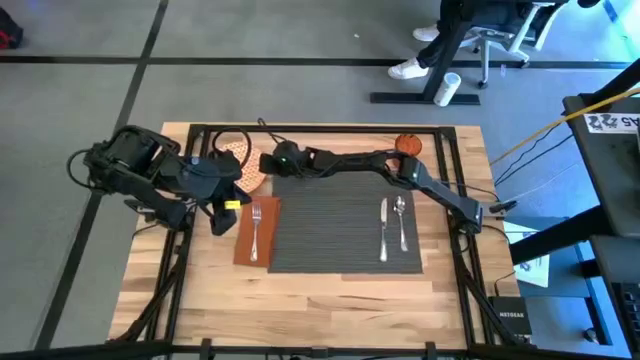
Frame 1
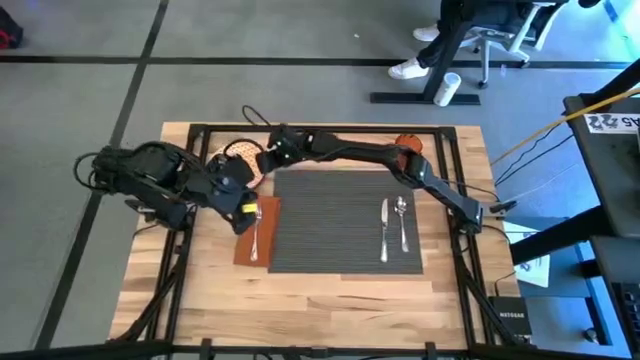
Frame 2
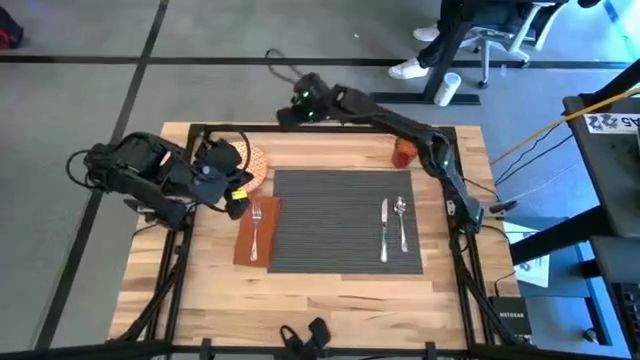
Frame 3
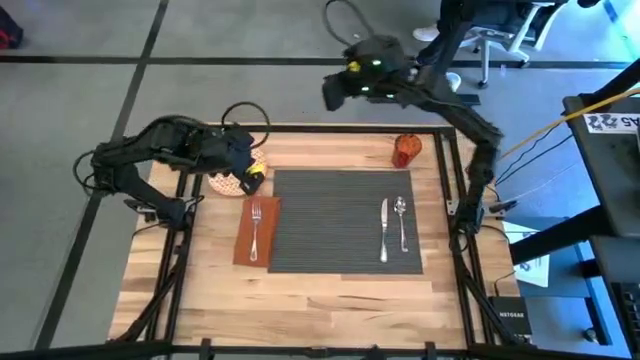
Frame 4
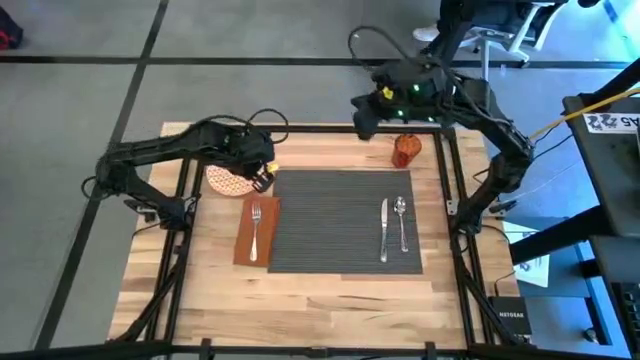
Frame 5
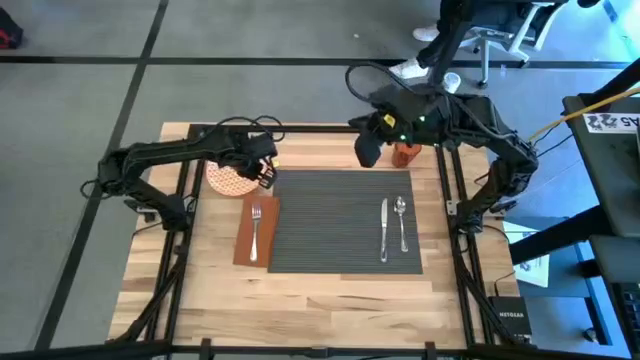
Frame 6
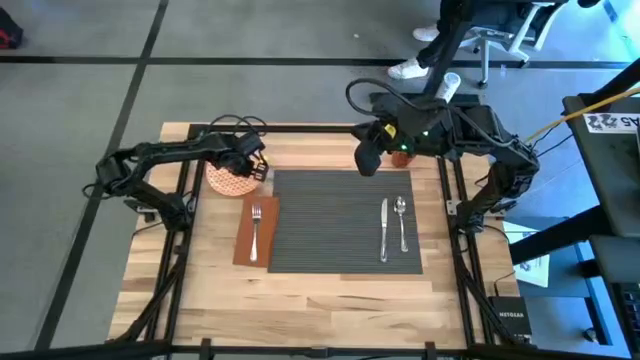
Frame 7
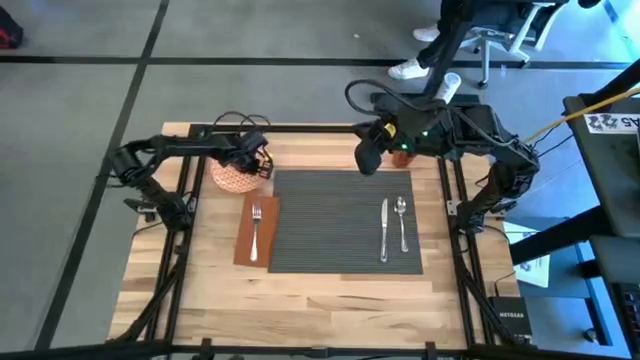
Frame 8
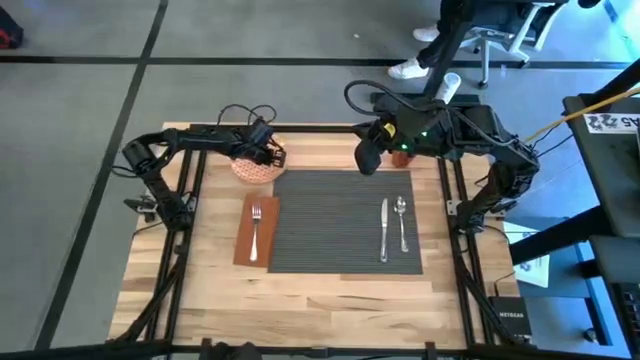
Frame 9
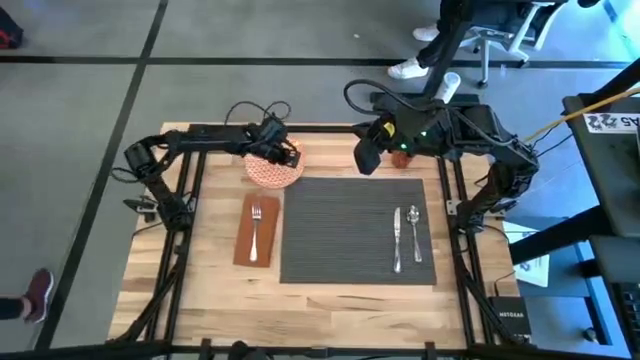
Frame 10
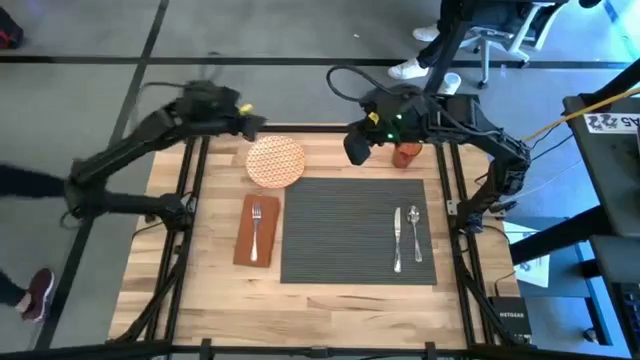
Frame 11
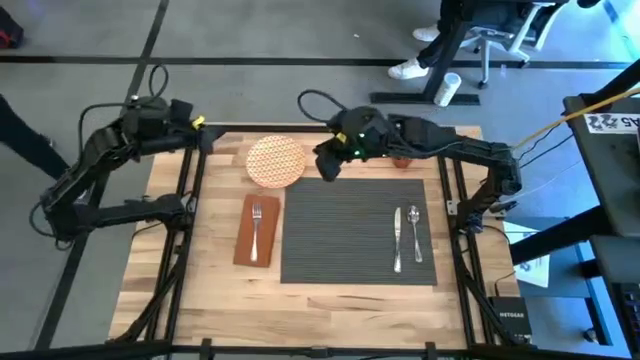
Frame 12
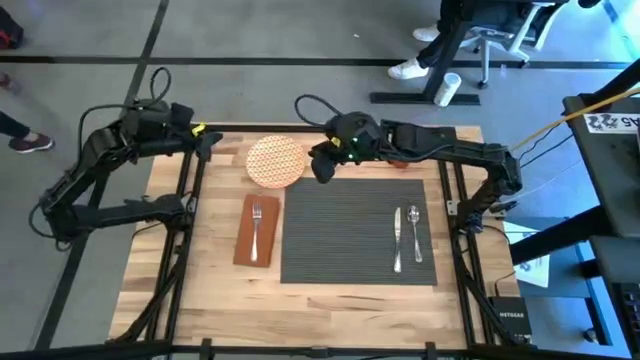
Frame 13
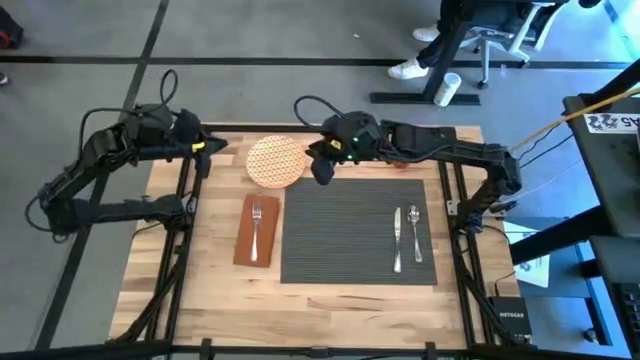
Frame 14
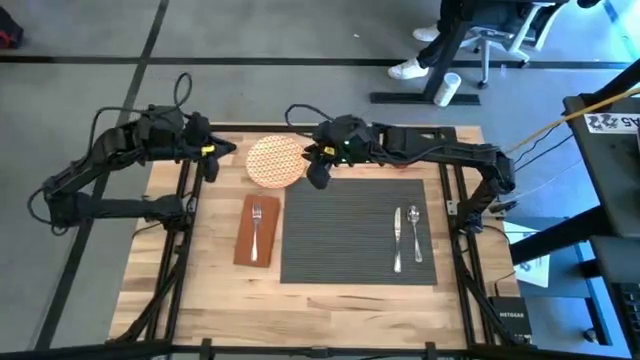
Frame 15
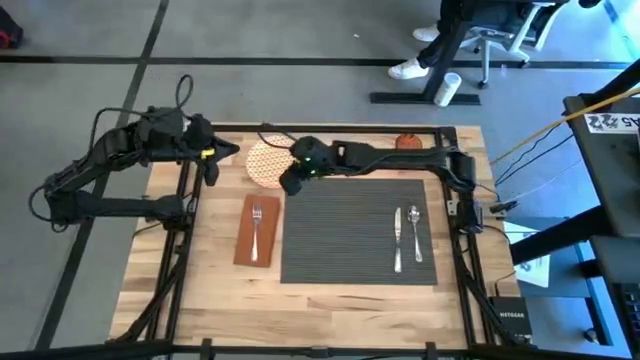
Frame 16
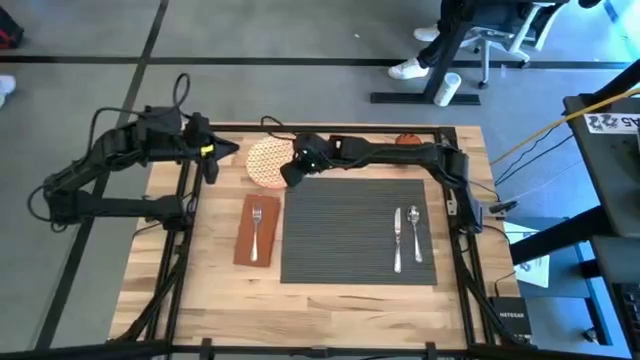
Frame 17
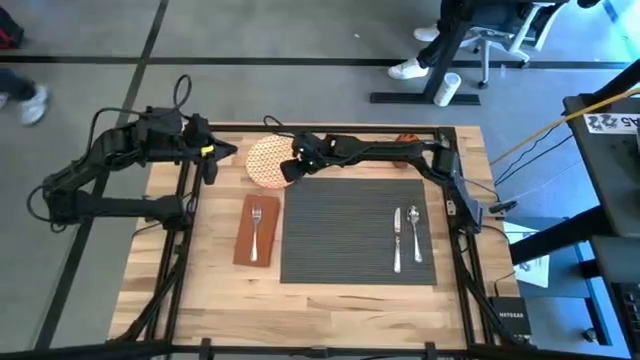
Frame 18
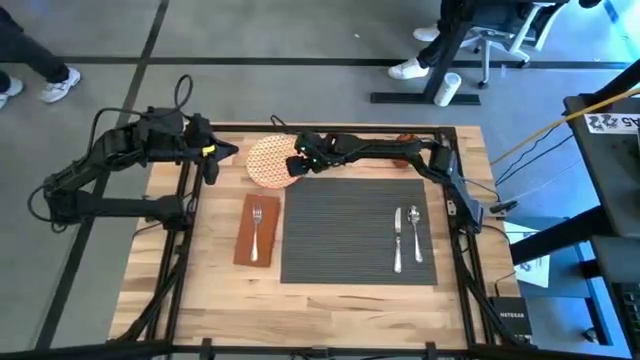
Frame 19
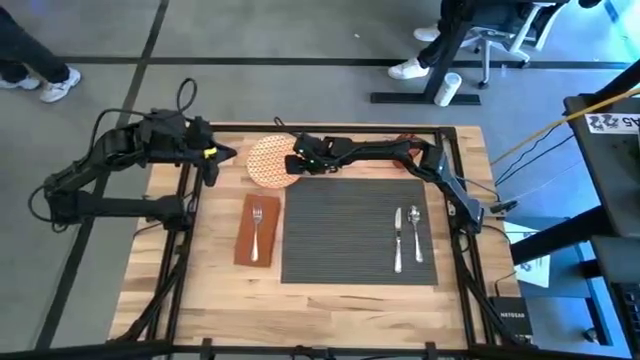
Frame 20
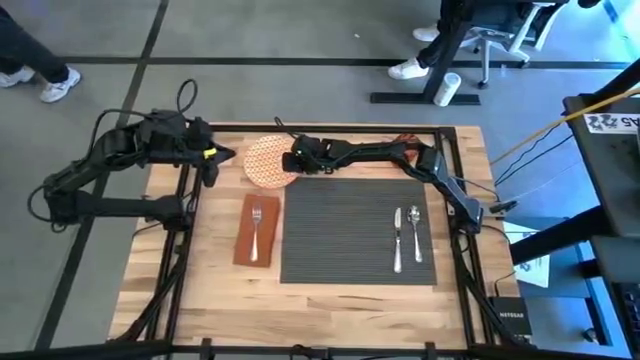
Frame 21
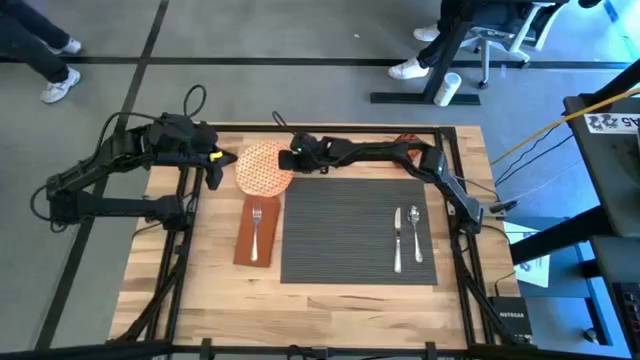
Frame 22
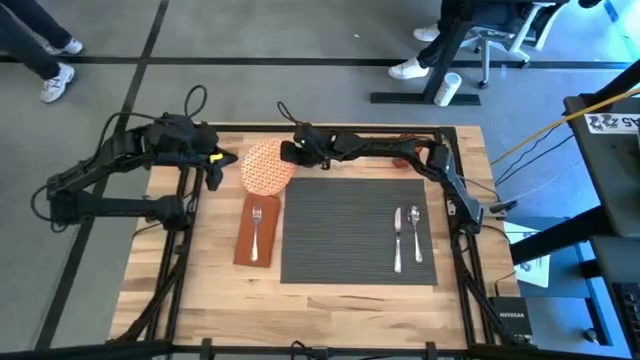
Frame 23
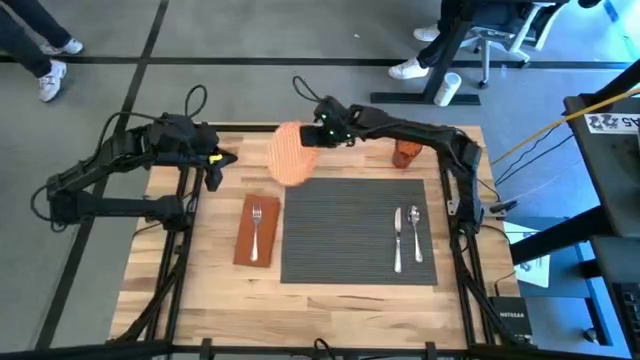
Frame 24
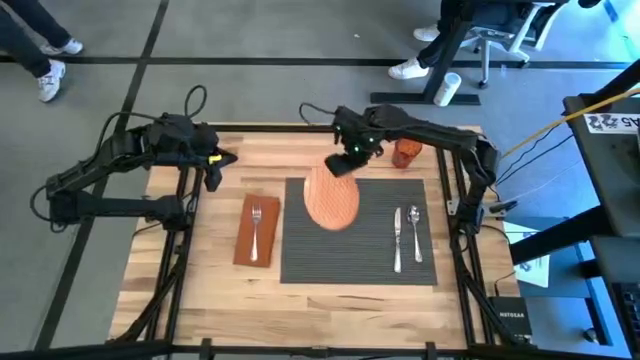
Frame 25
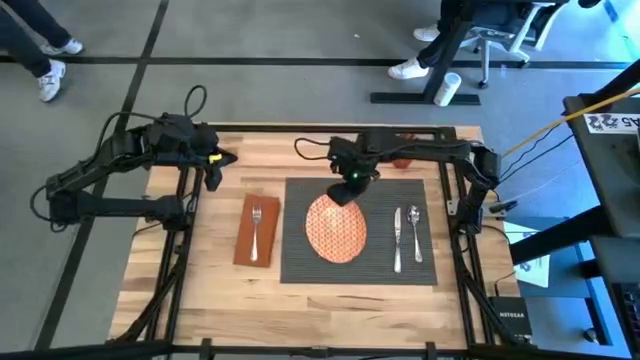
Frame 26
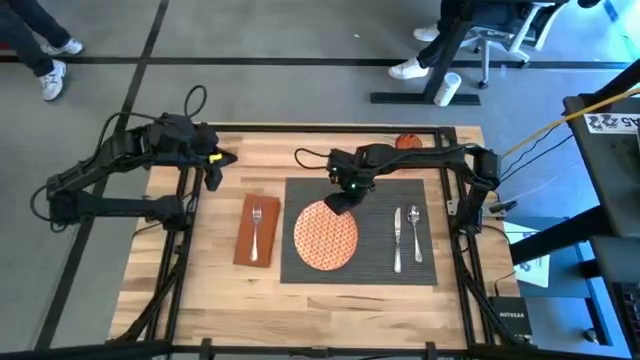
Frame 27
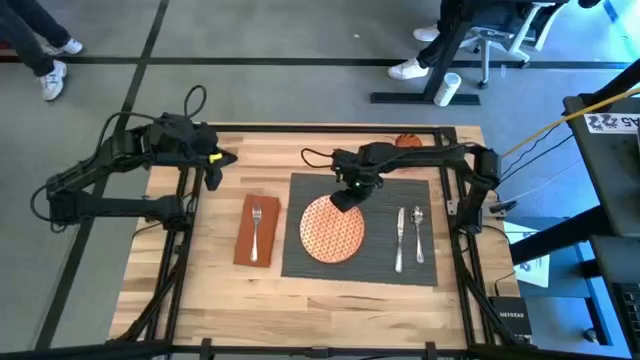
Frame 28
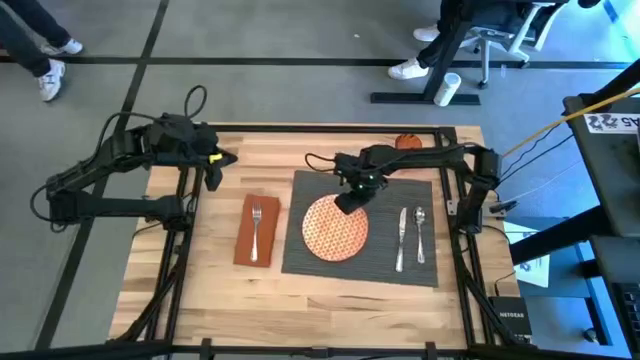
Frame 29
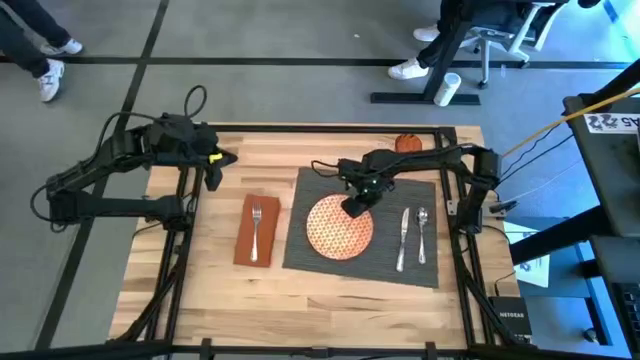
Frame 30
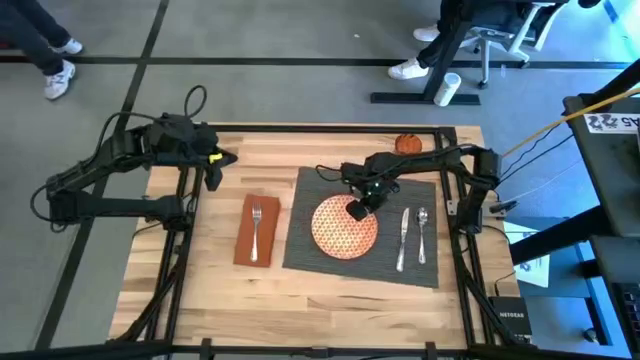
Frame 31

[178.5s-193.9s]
Task: Set table place
Put the orange plate on the gray tablemat to the left of the silver fork

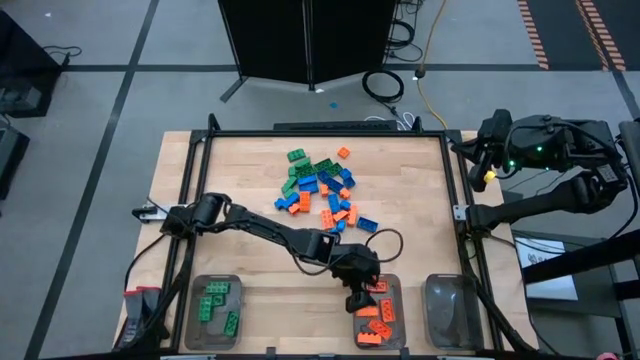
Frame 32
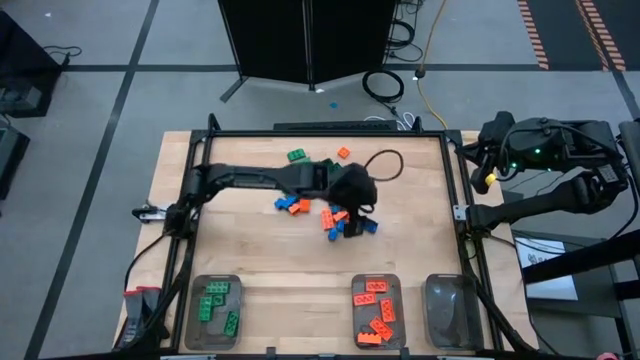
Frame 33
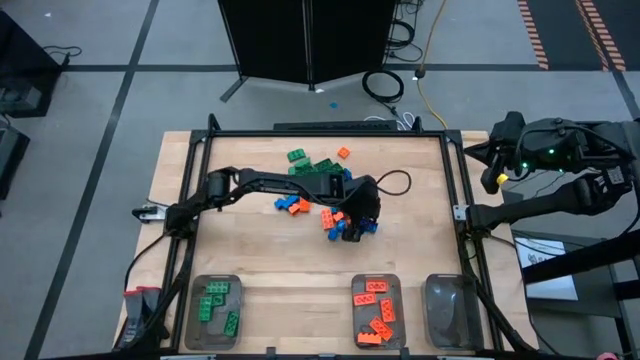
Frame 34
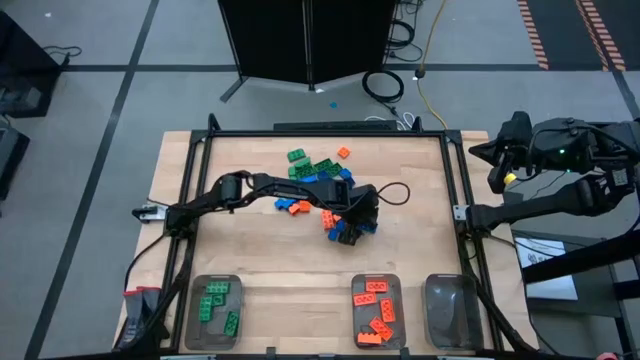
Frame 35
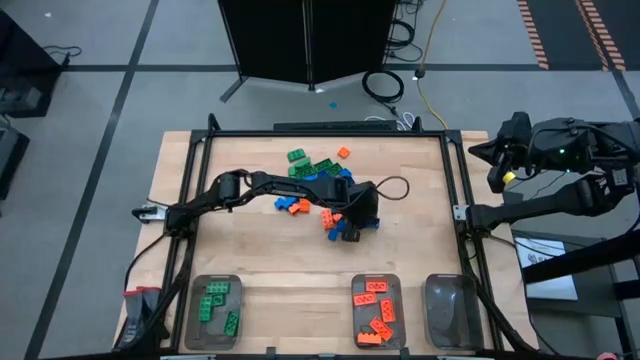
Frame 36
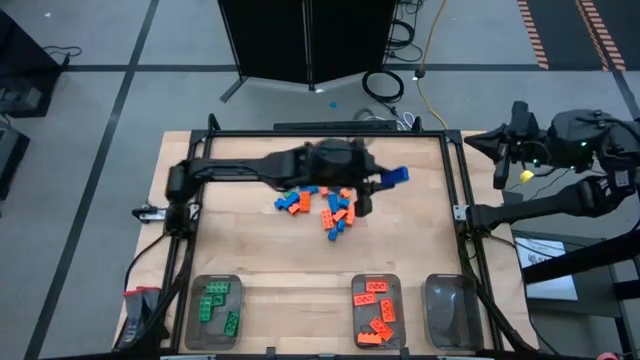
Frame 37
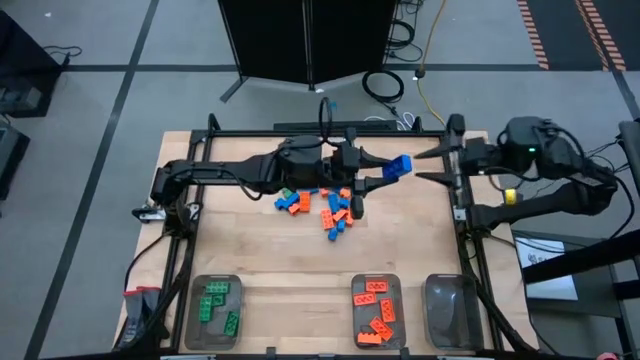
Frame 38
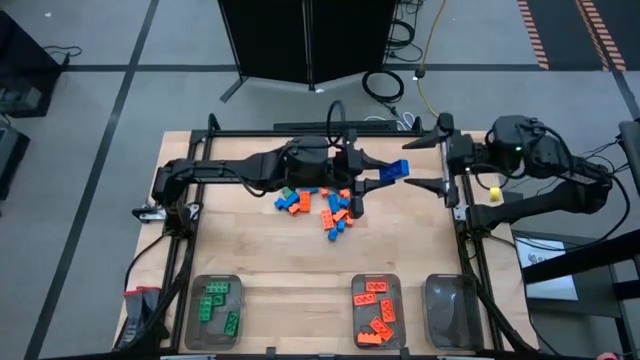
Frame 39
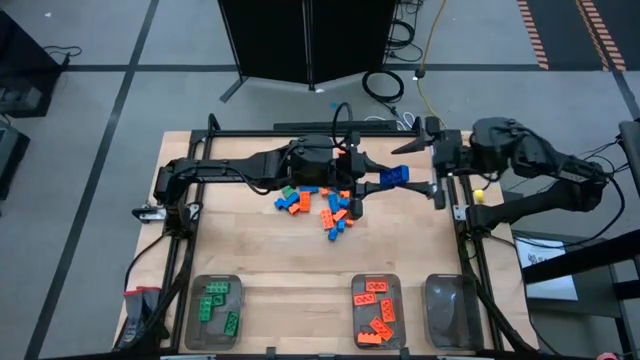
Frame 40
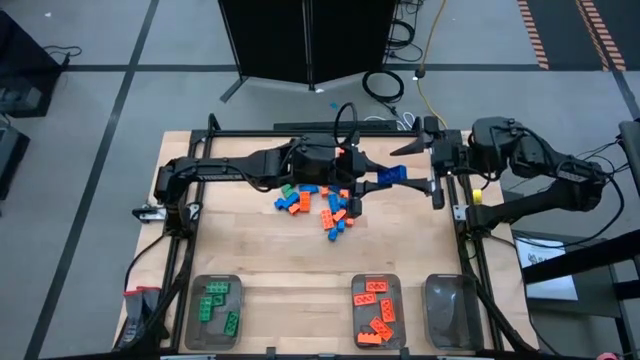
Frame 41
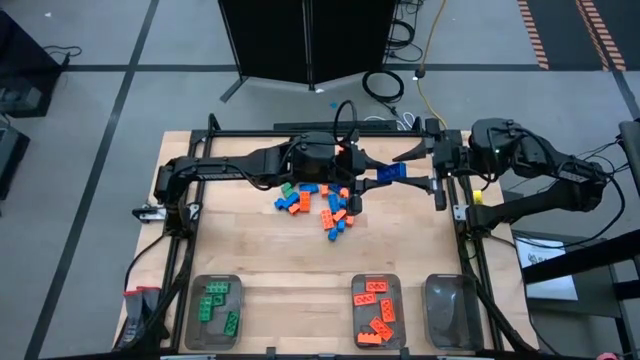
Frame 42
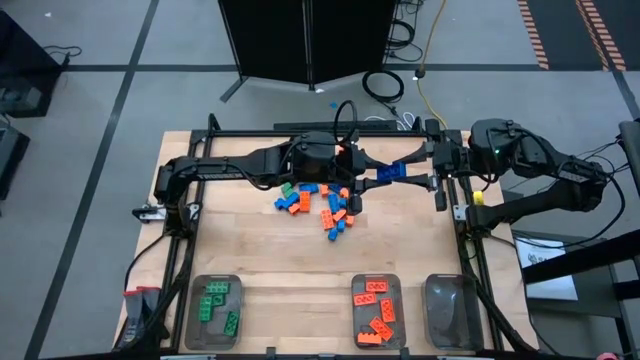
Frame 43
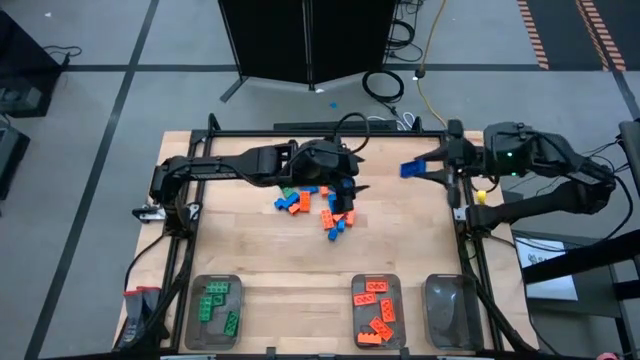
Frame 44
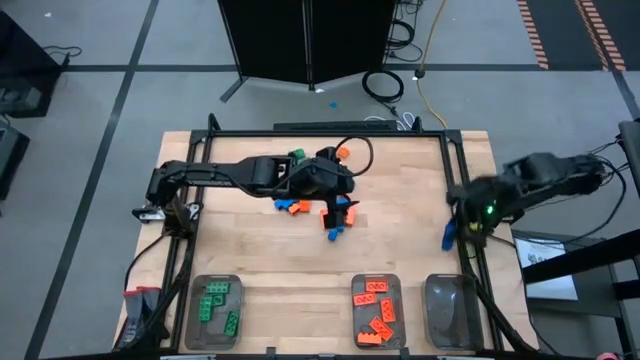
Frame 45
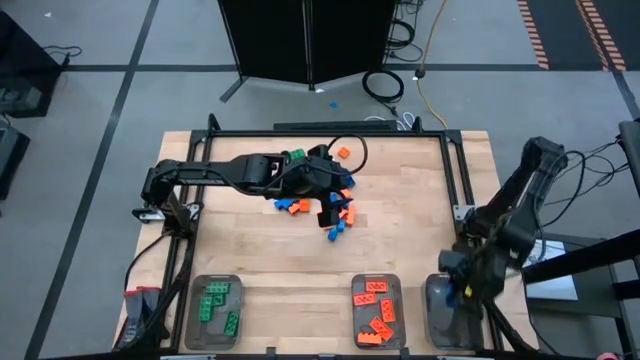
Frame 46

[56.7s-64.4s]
Task: Sort blocks
Put the blue game piece into the right black bin
